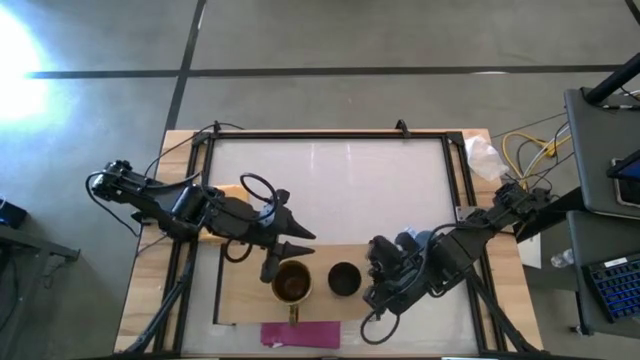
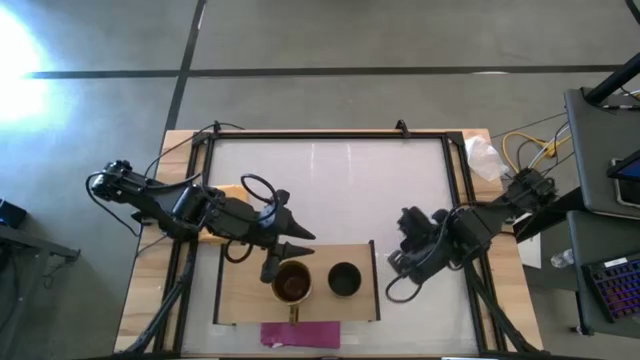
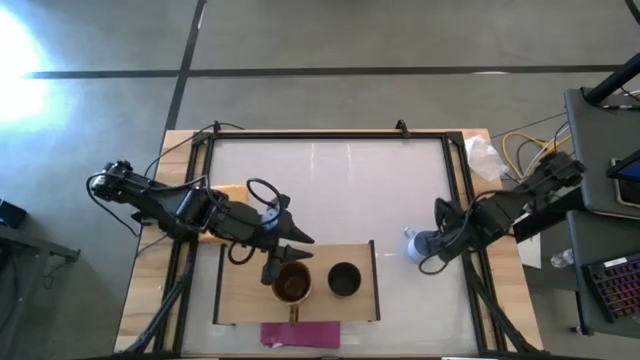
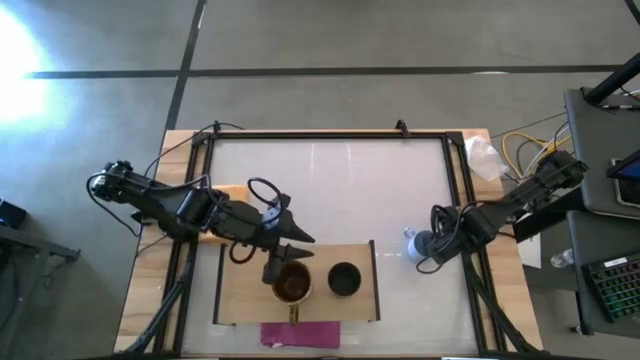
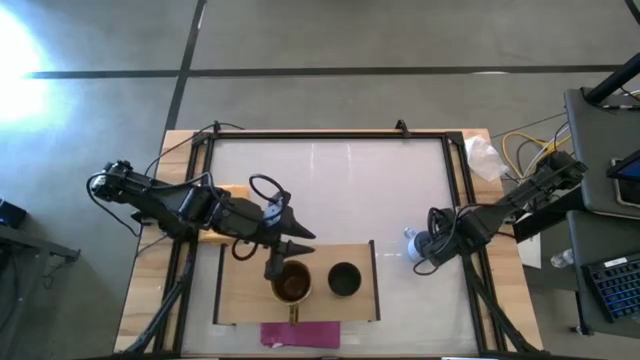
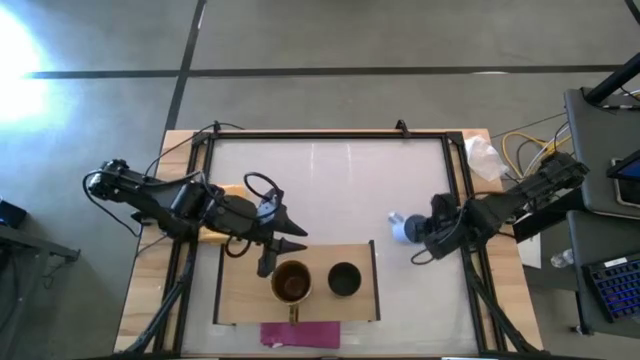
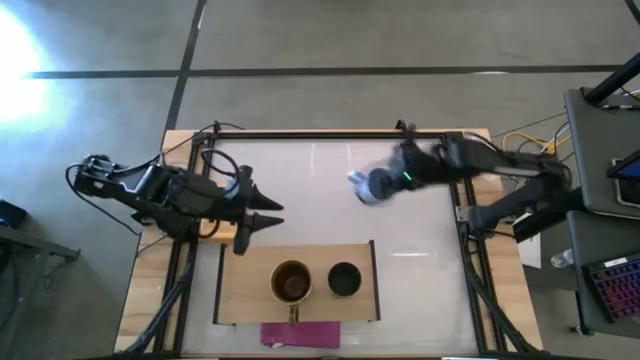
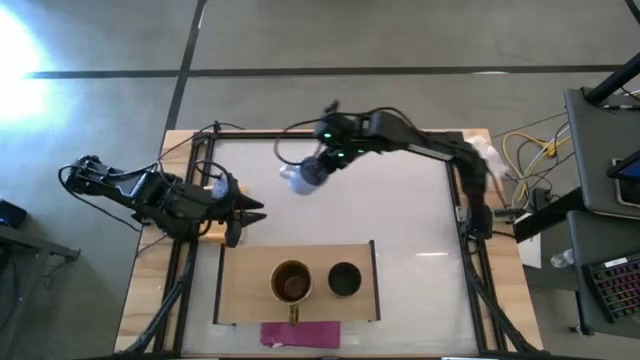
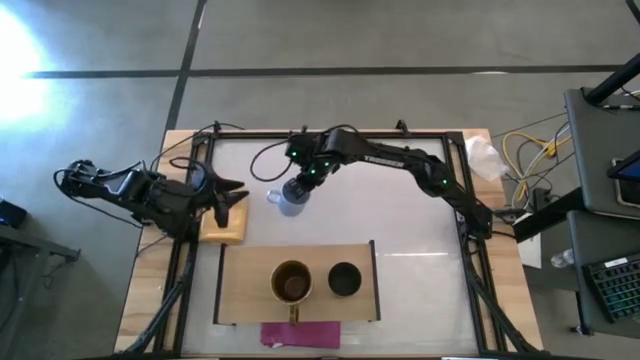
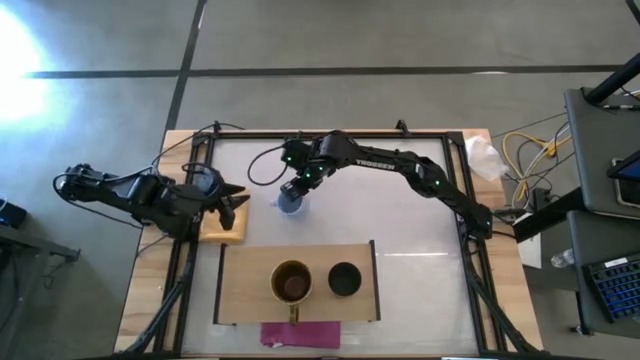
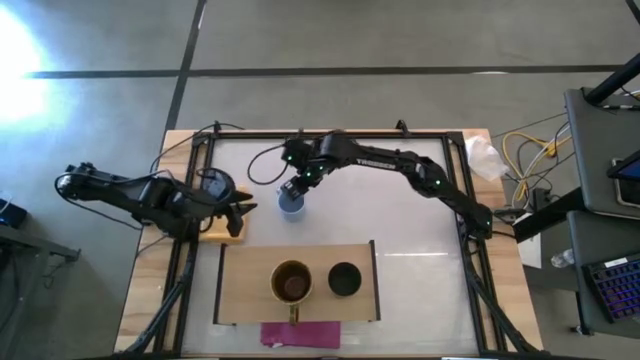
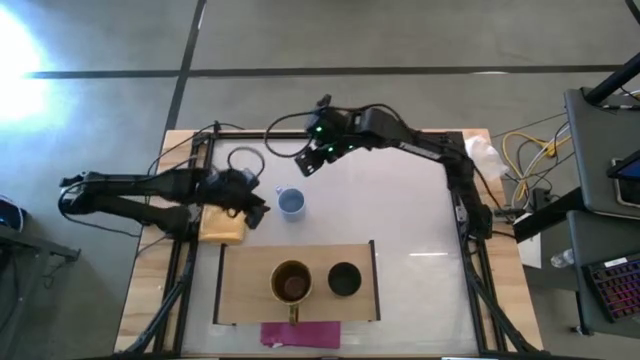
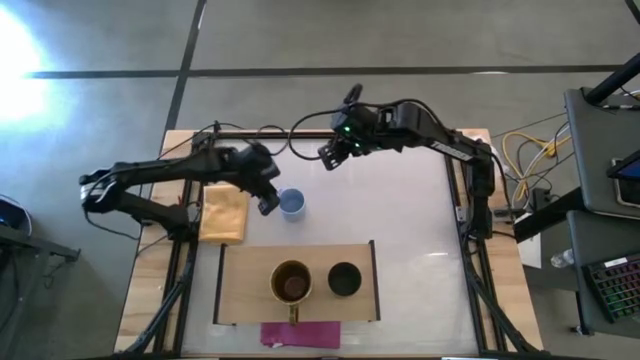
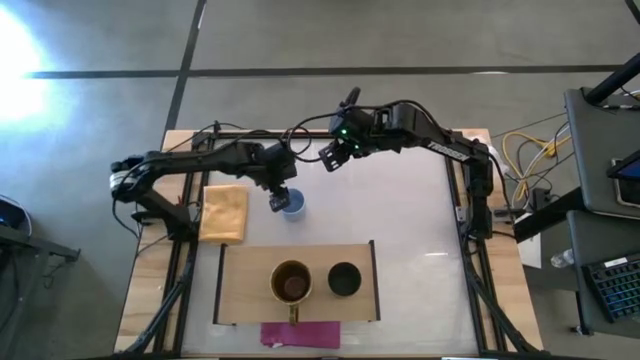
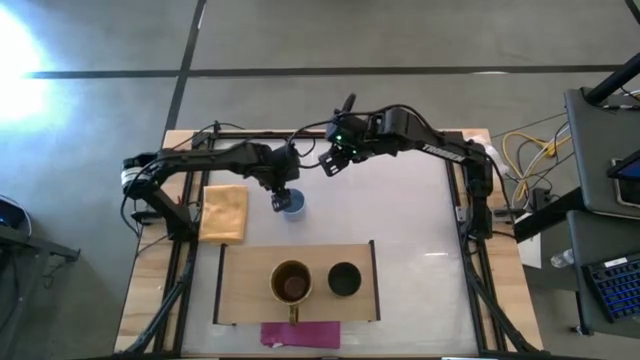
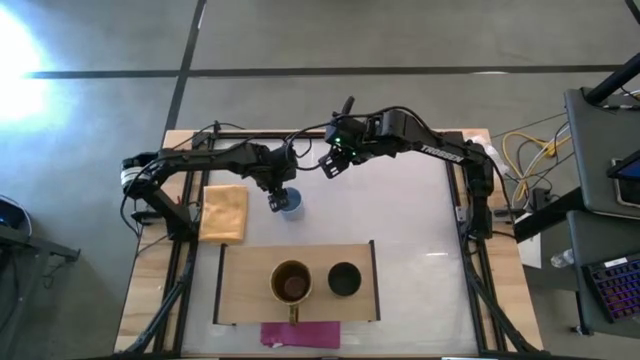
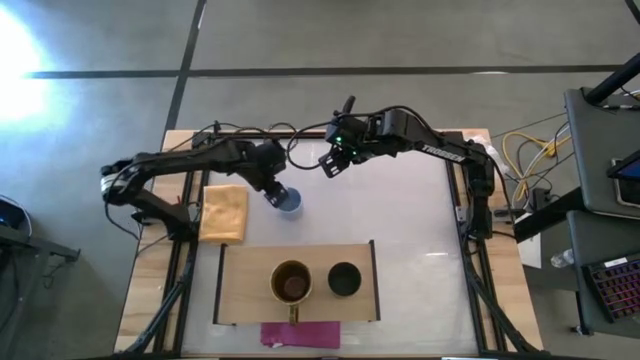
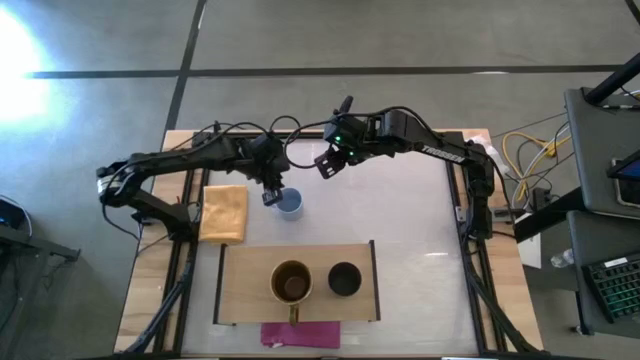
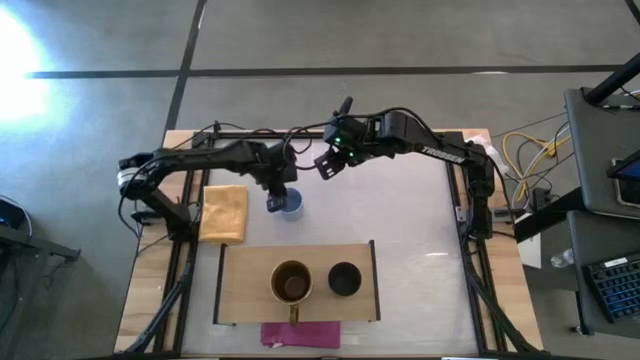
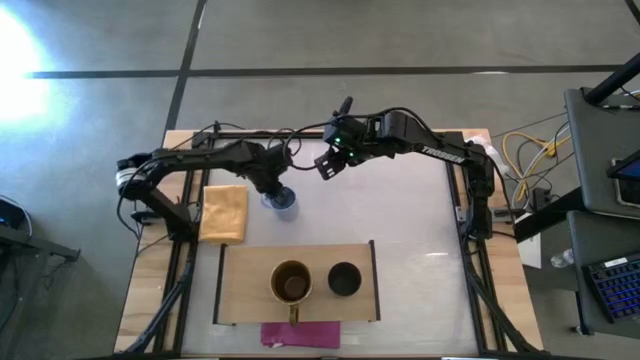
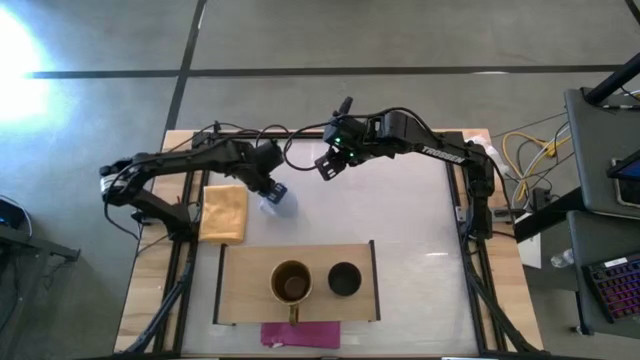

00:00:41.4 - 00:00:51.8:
Task: Stack small to large cups/mugs on shelf
Put the light blue mug on the shelf

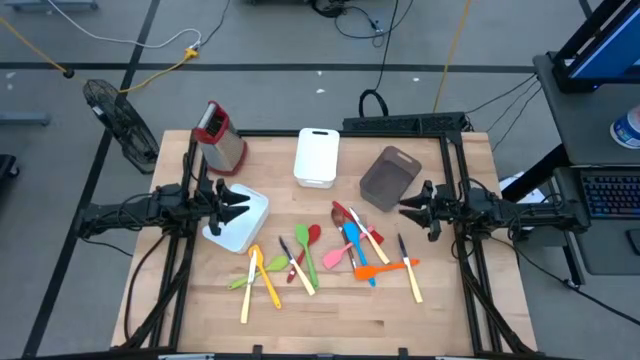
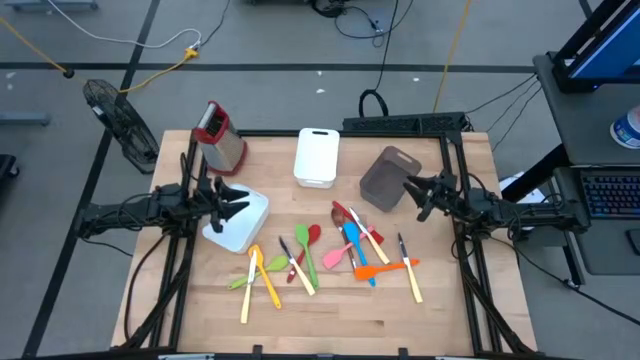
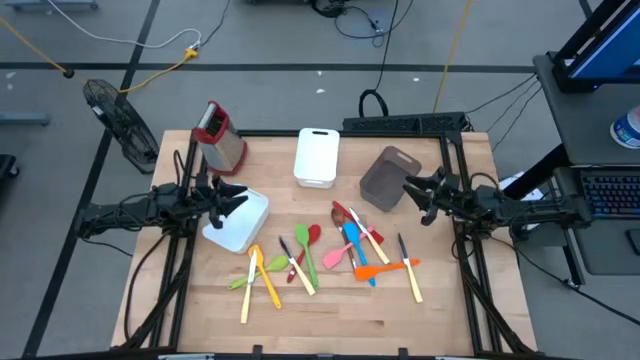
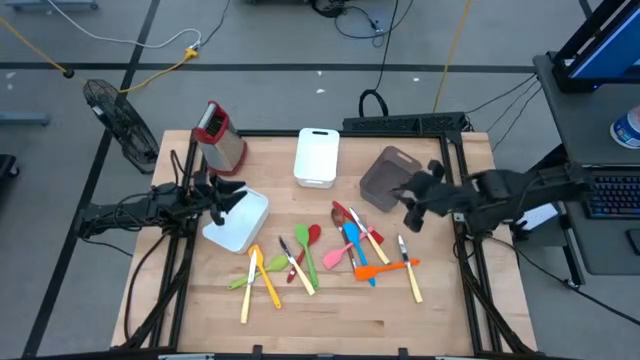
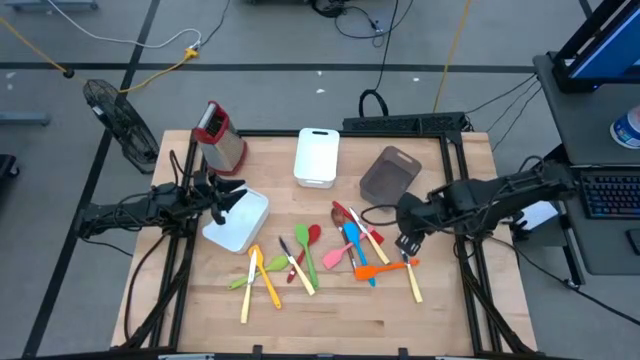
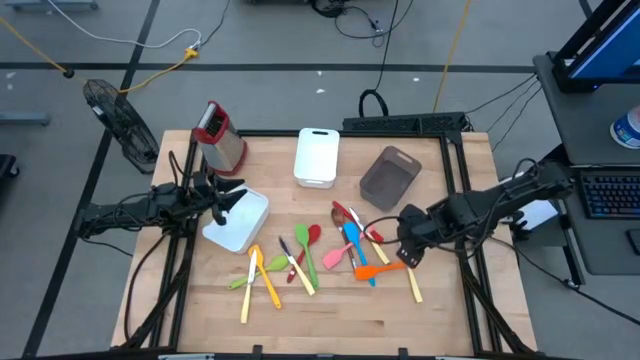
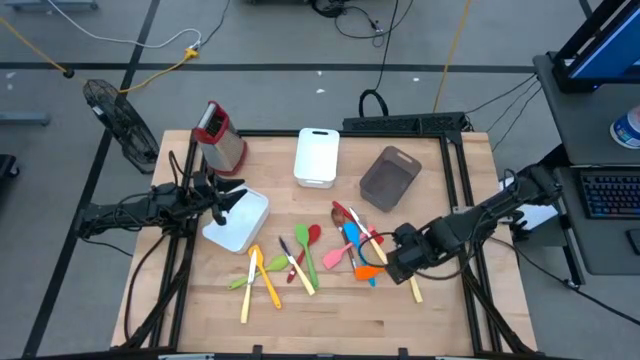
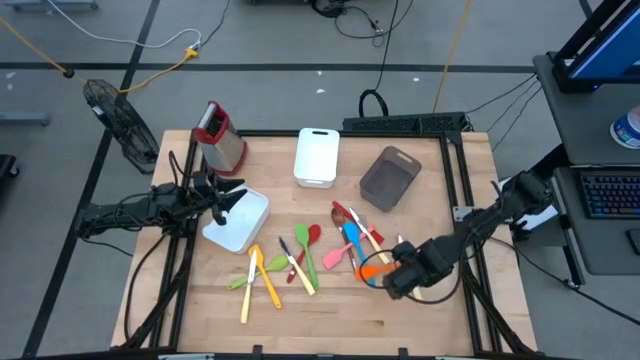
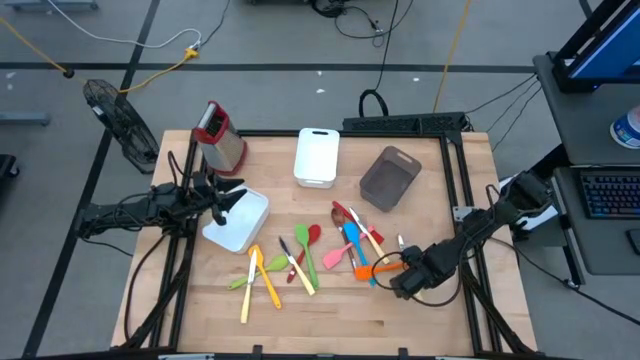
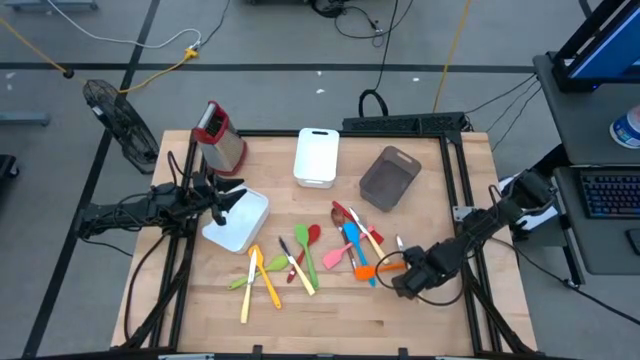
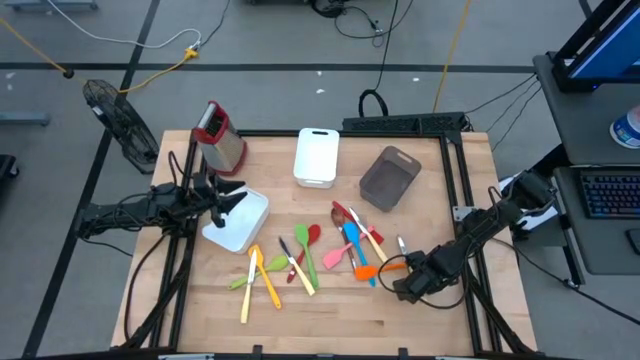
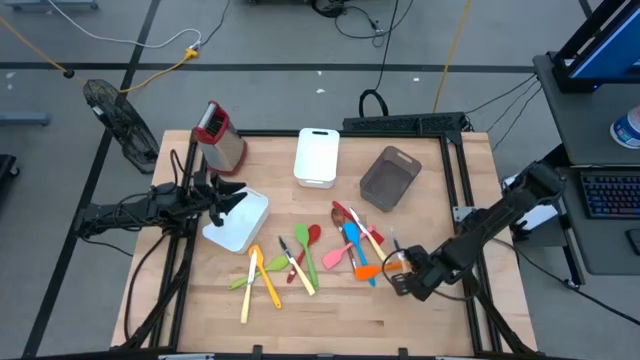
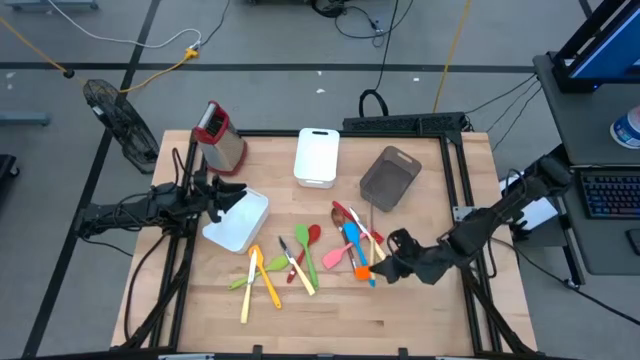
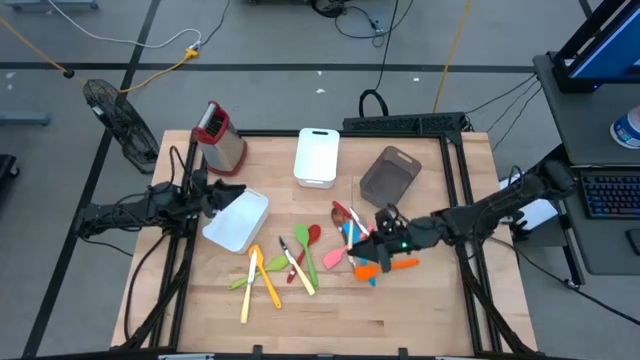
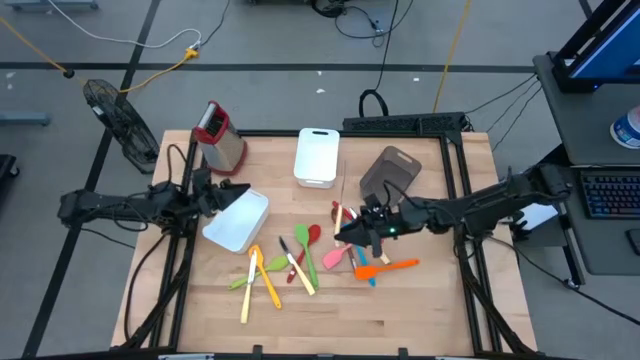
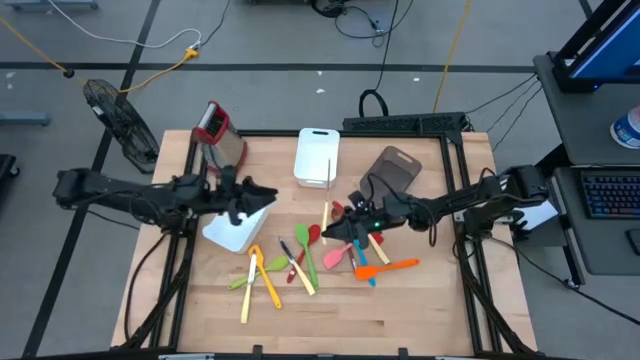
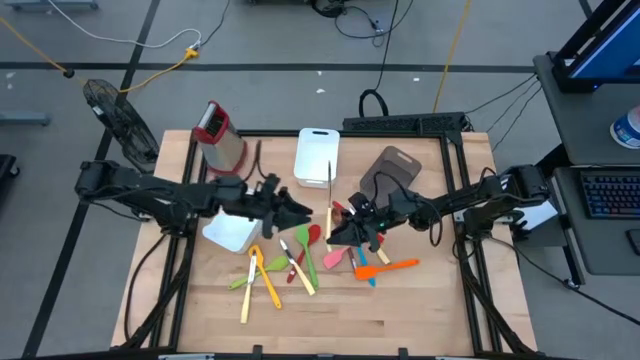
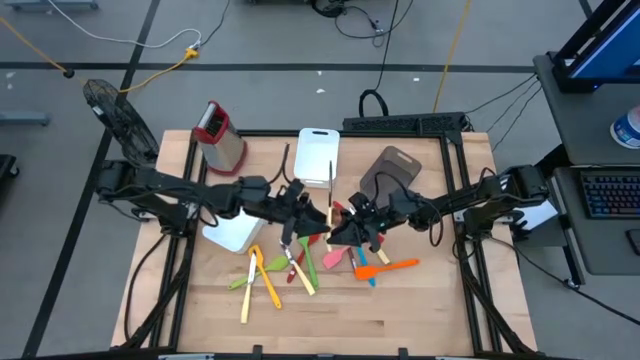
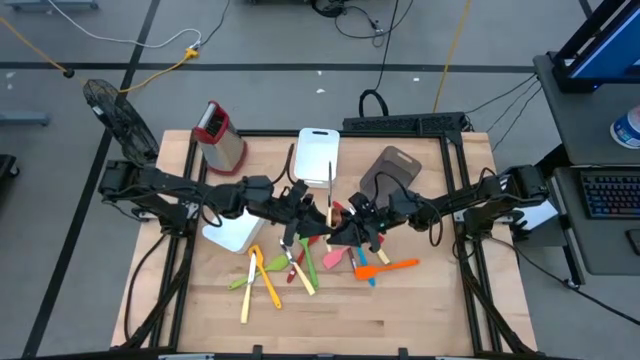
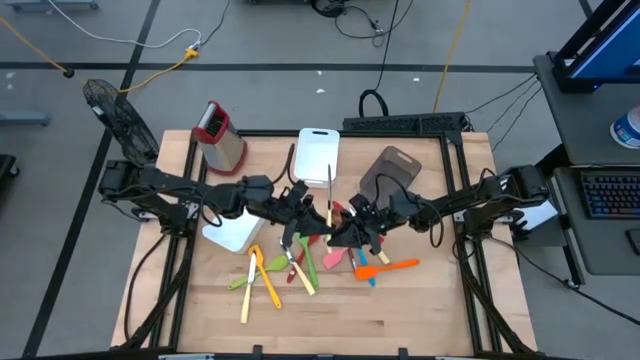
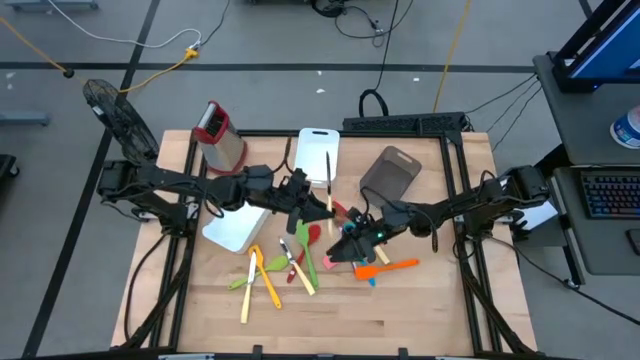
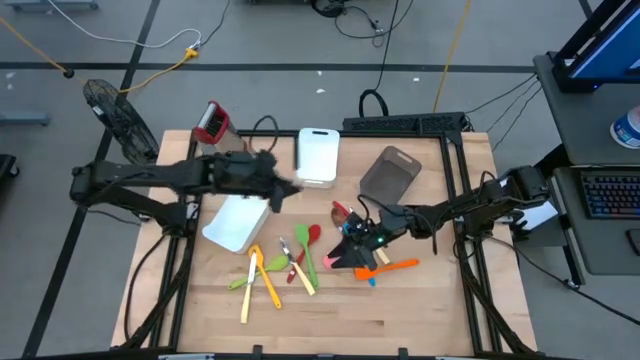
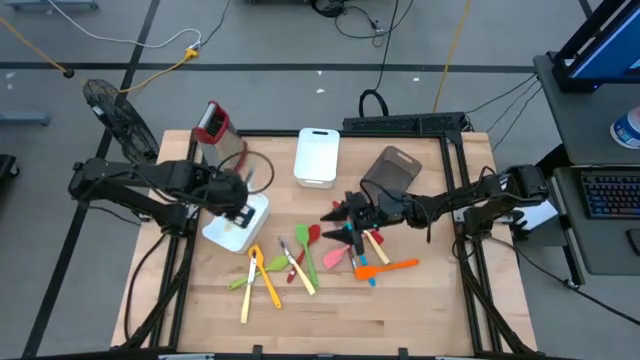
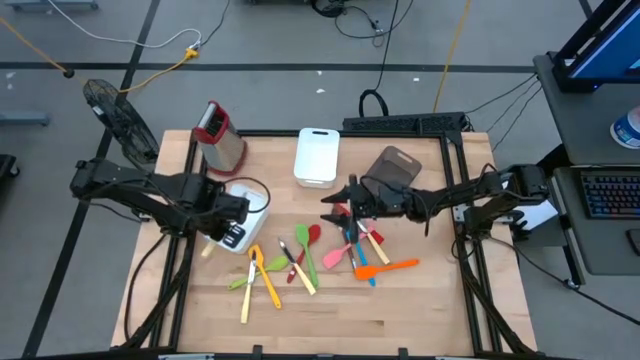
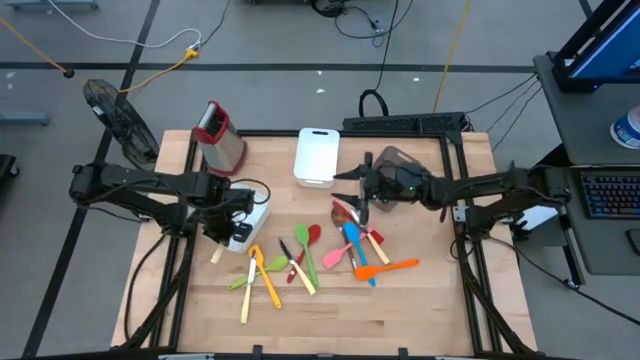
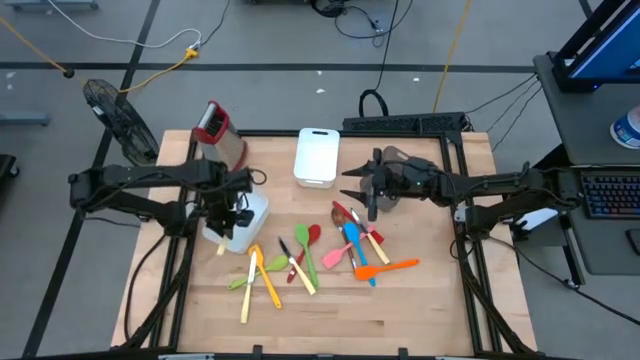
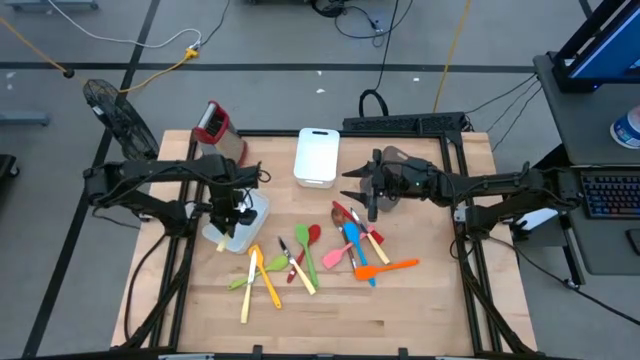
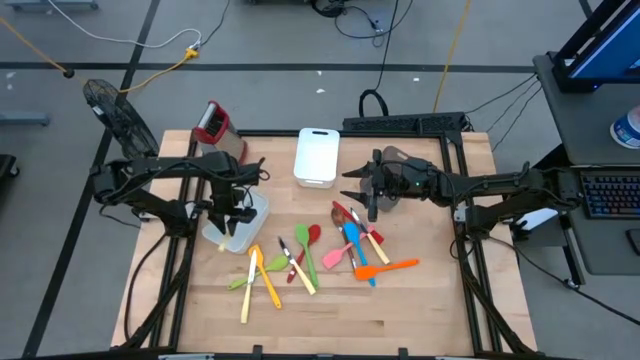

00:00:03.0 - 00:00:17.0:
Task: Pick & Place Kitchen Items
Put the yellow table knife into the bottom white bin
